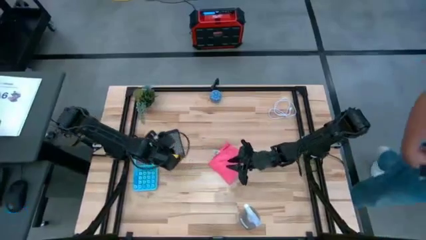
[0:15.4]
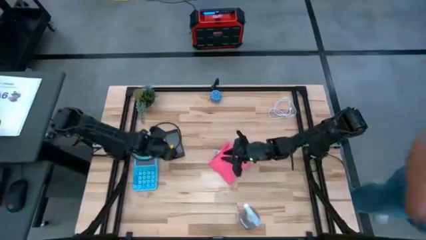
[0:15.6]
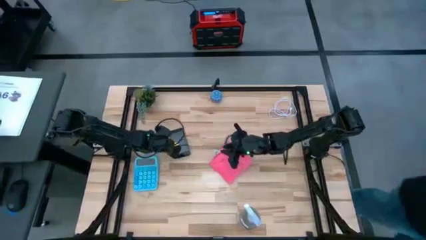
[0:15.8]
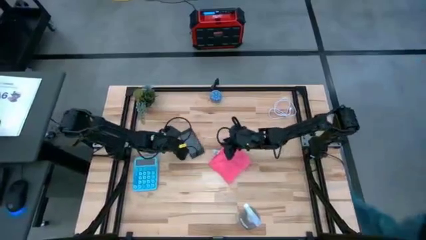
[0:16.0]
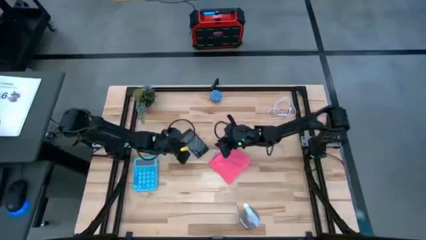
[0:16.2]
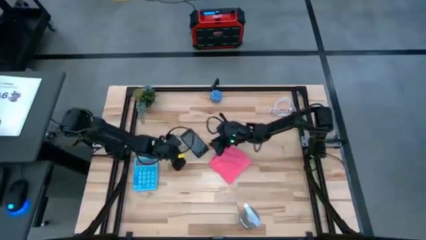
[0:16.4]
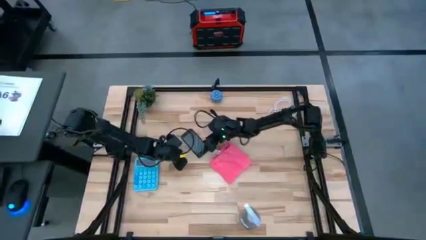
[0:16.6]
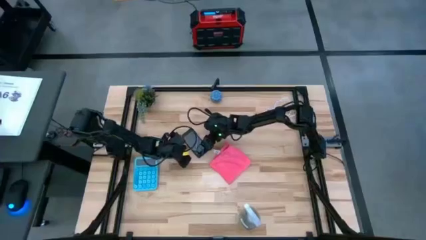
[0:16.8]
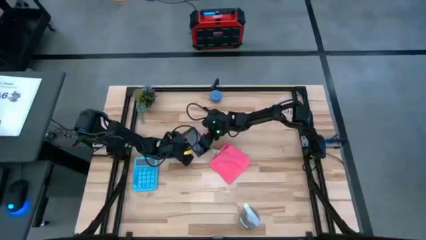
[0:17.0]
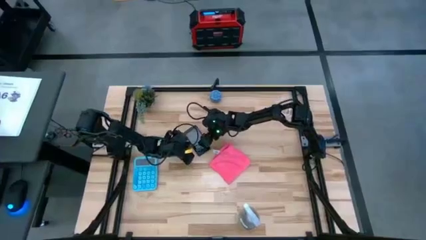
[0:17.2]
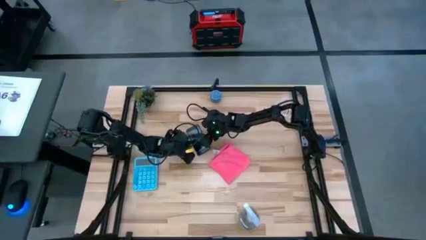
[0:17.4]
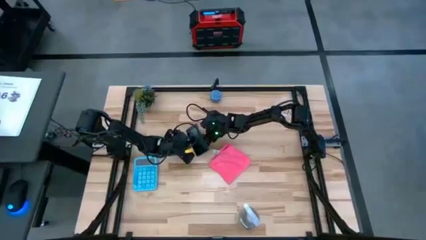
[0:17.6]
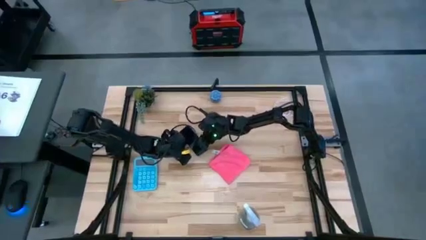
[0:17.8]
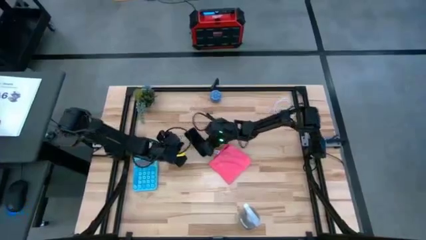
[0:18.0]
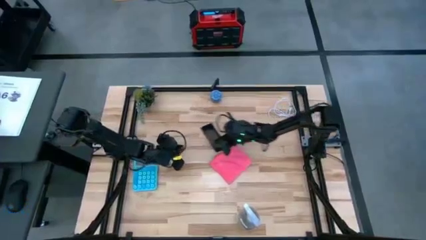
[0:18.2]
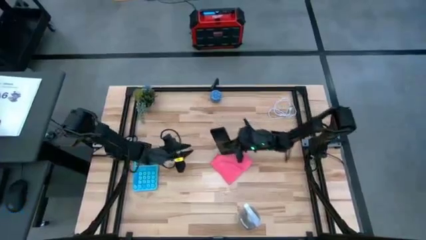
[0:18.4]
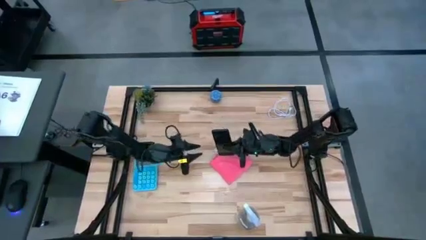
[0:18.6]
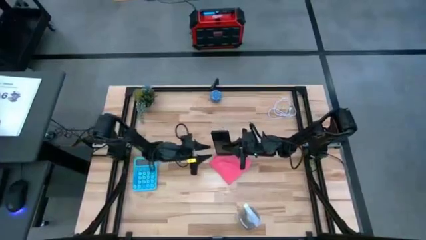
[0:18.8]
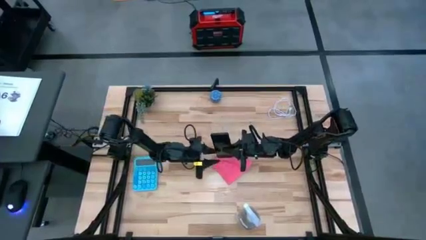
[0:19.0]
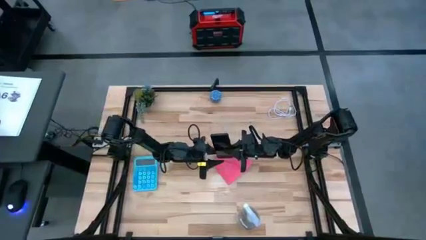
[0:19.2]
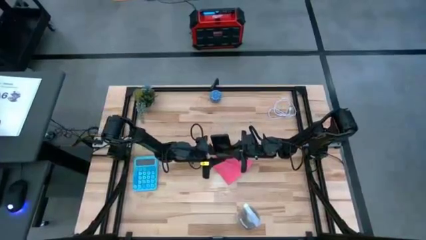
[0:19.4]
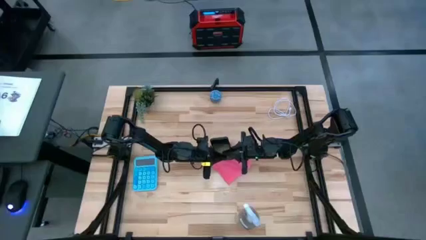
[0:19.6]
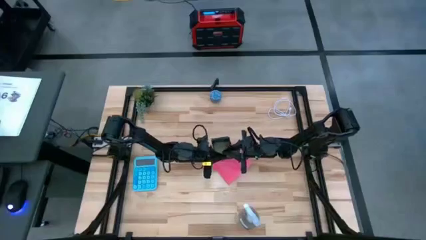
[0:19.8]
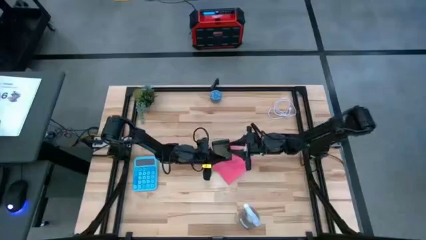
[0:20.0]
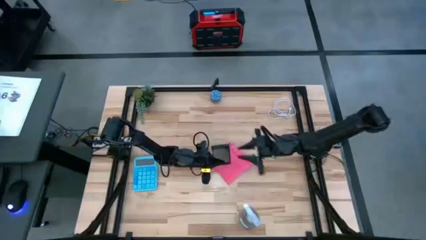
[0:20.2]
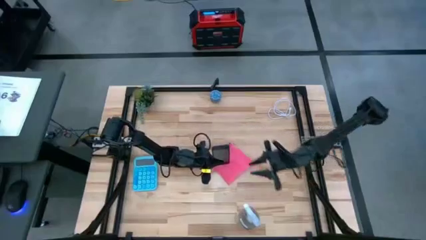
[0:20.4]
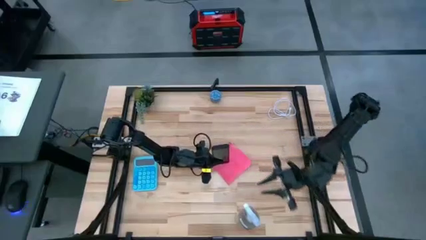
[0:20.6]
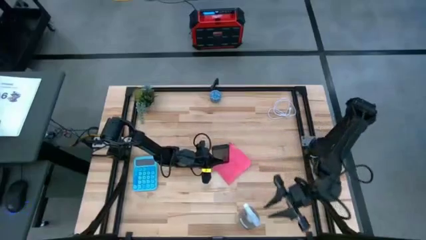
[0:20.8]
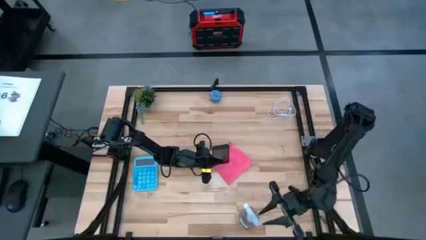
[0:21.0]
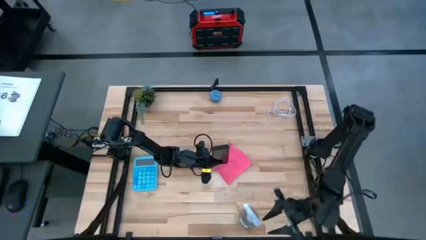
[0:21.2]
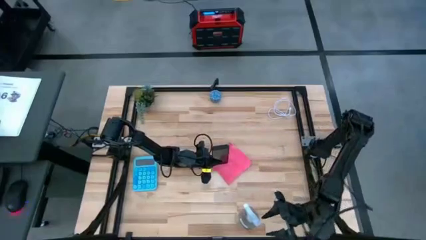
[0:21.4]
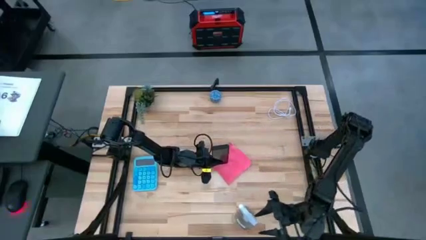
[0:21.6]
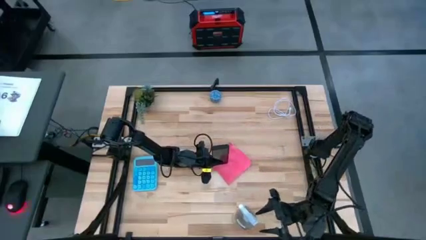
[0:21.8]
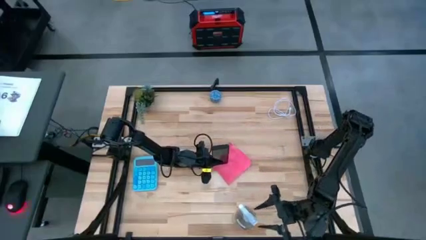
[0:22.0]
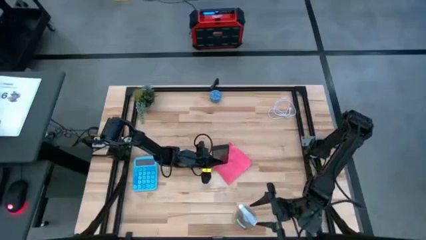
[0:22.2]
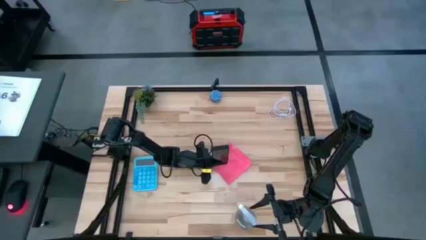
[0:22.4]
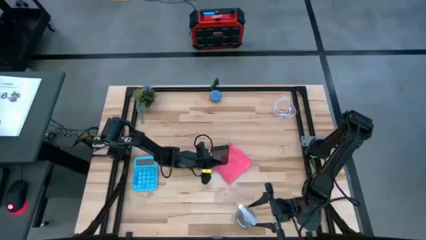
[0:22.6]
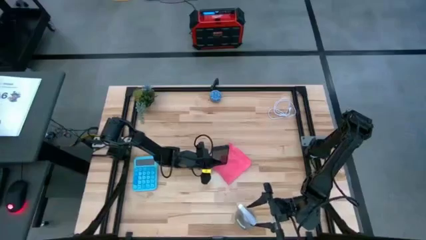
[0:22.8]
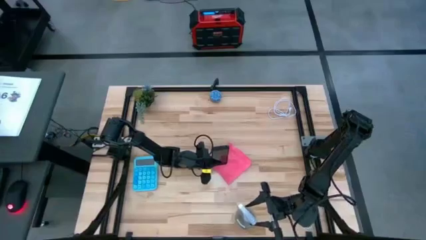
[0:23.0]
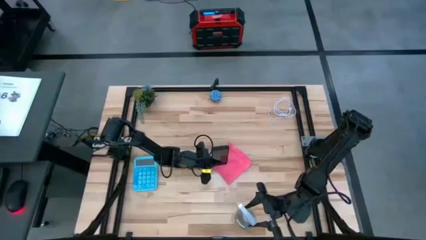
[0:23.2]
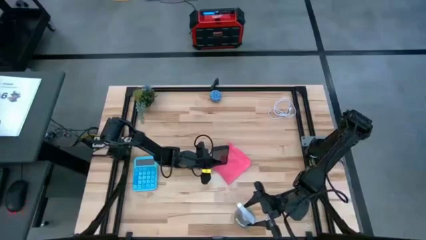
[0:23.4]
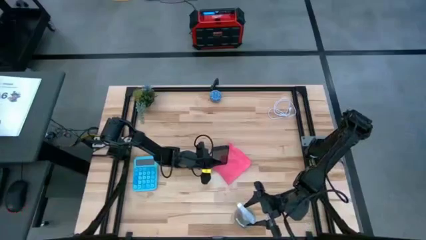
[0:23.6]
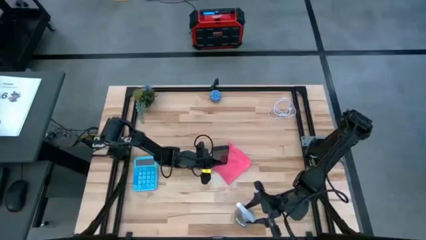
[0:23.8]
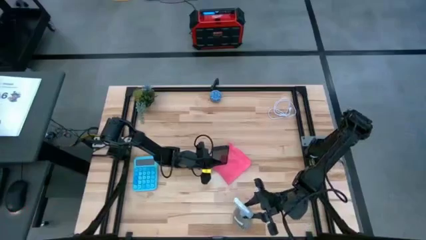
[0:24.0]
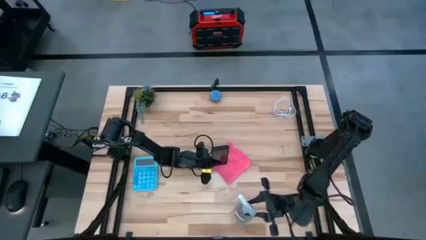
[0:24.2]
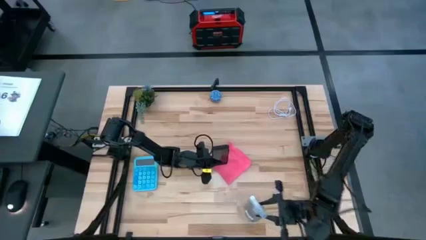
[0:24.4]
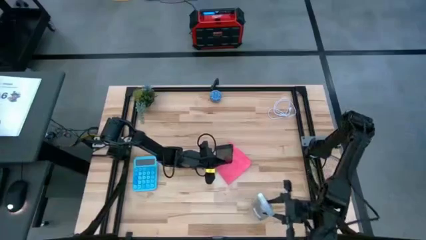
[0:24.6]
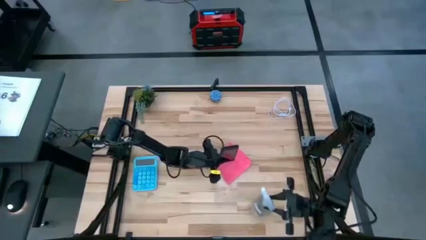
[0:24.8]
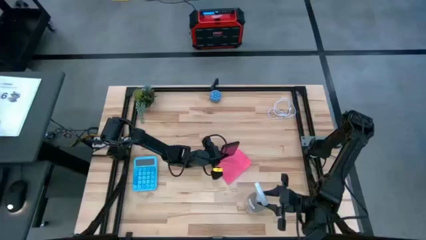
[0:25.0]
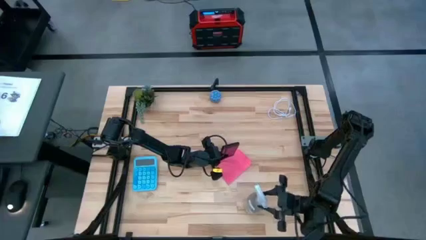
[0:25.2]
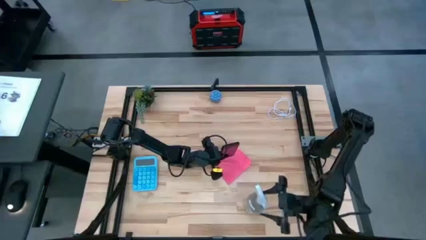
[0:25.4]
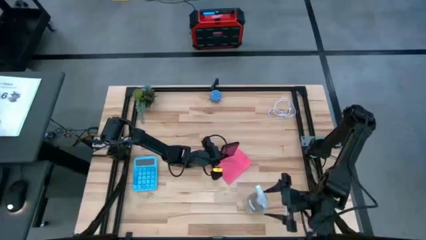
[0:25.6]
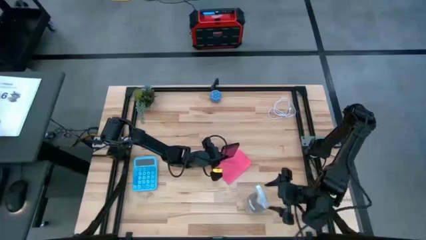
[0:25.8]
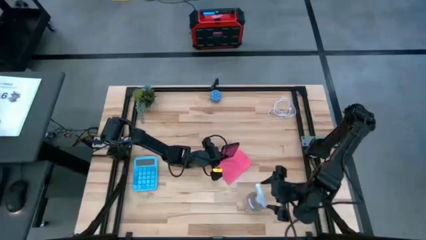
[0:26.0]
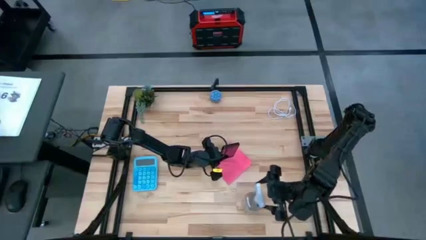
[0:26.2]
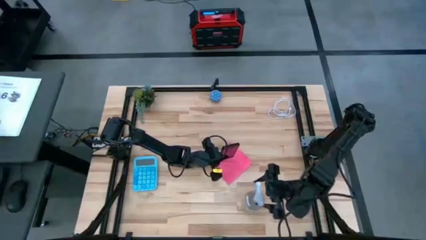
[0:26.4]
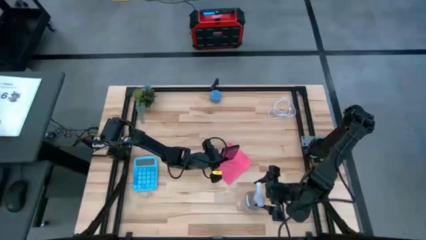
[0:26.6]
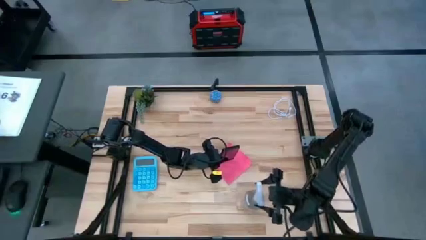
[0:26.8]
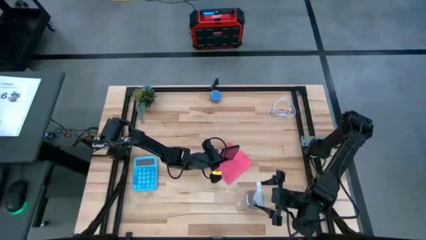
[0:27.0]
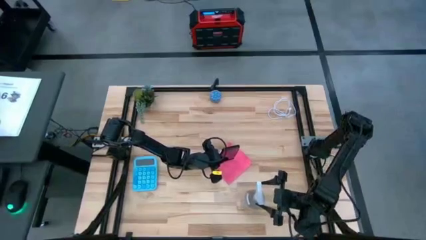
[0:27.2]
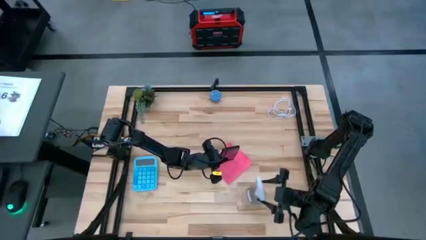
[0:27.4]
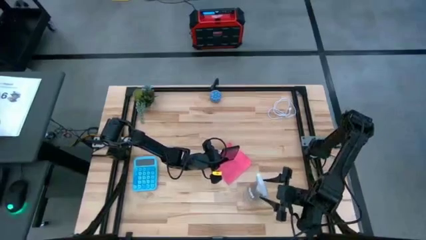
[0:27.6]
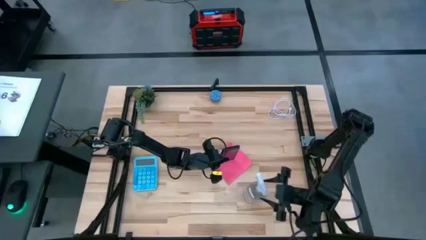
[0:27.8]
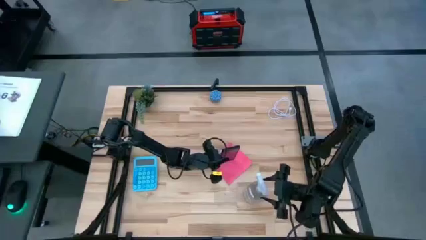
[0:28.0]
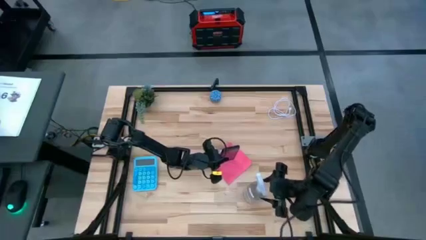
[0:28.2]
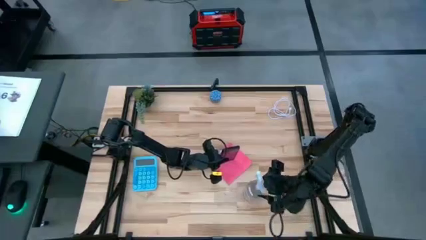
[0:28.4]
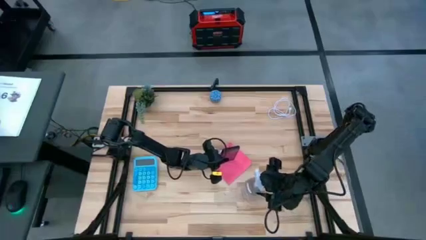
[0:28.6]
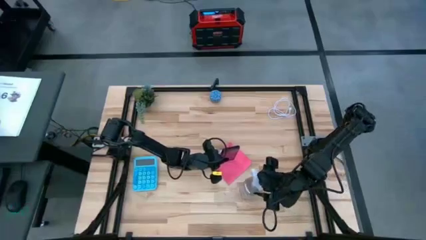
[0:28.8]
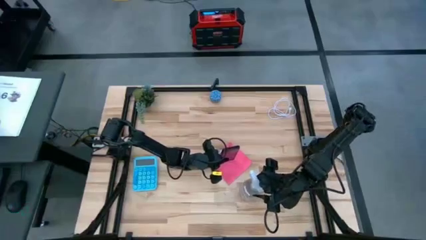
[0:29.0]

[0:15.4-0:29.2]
Task: Apply microfiber cloth
Spray the black cellphone with the transparent spray bottle
